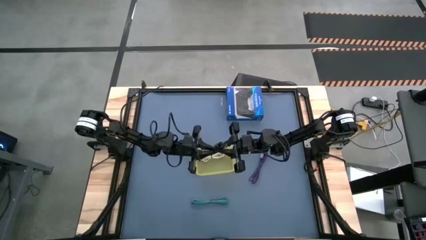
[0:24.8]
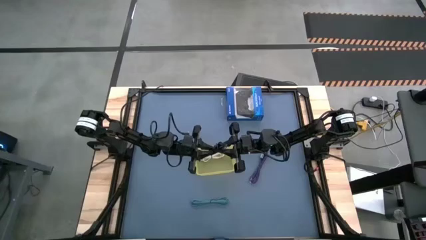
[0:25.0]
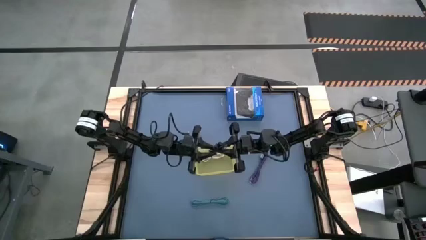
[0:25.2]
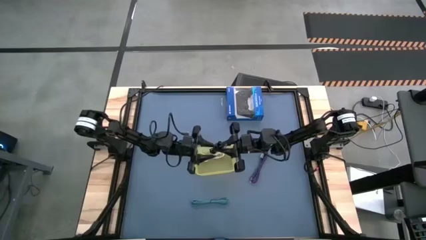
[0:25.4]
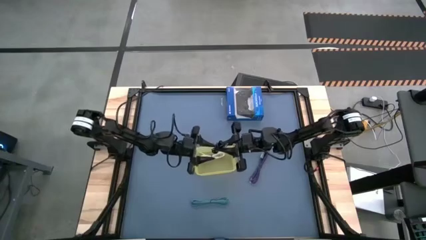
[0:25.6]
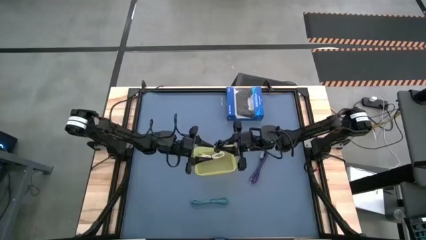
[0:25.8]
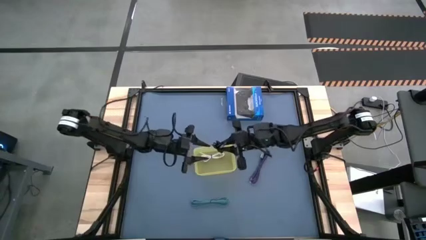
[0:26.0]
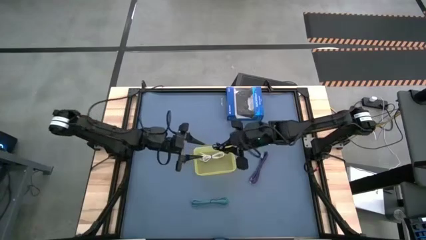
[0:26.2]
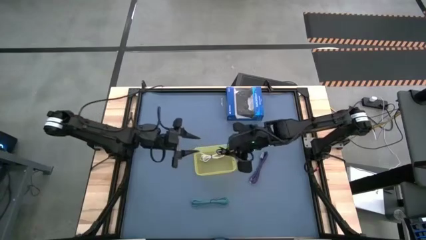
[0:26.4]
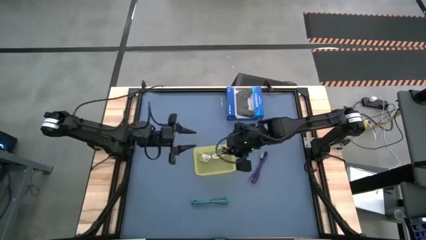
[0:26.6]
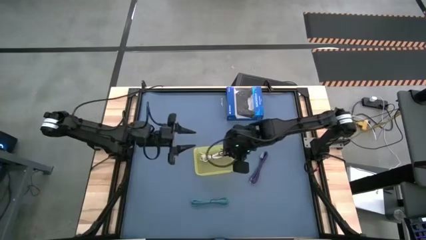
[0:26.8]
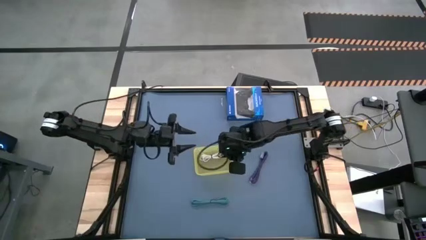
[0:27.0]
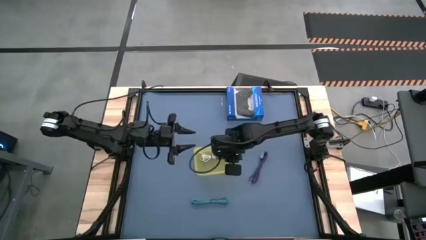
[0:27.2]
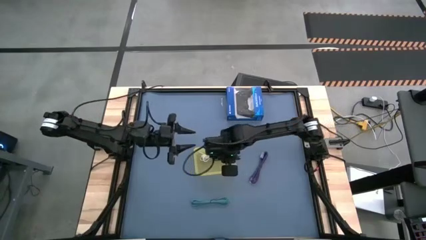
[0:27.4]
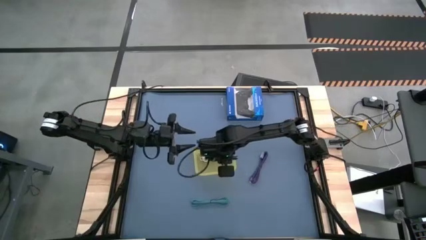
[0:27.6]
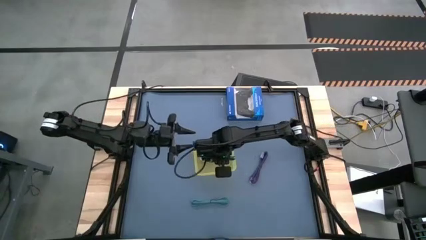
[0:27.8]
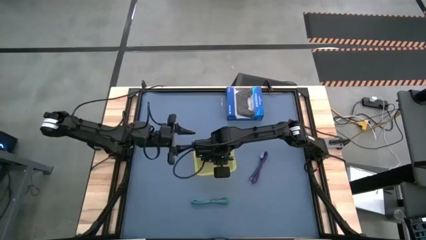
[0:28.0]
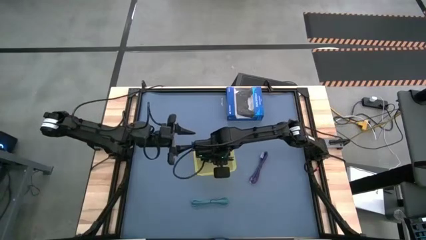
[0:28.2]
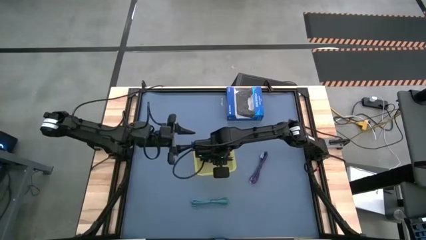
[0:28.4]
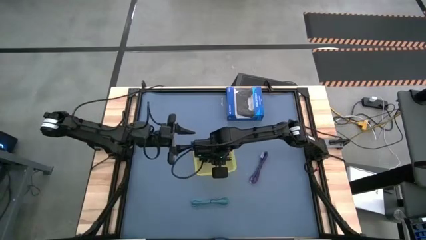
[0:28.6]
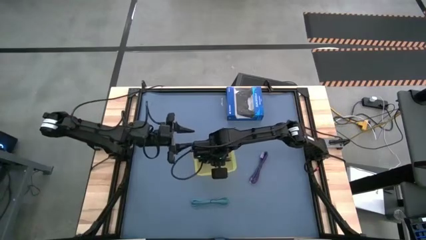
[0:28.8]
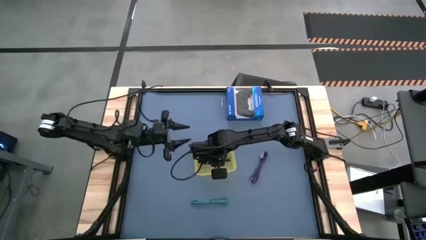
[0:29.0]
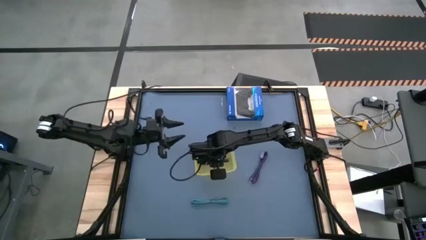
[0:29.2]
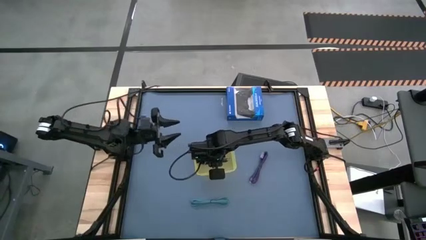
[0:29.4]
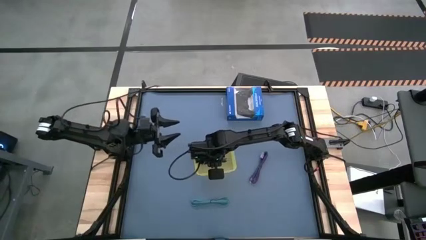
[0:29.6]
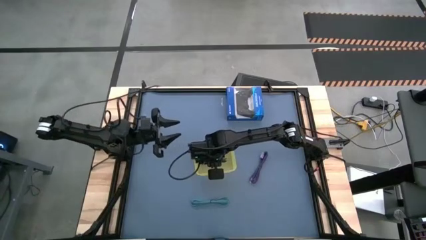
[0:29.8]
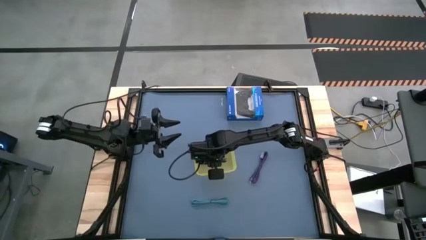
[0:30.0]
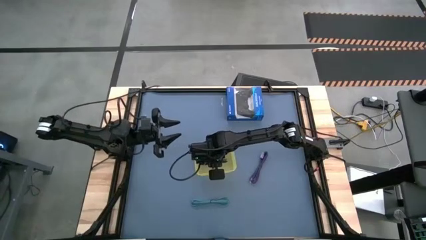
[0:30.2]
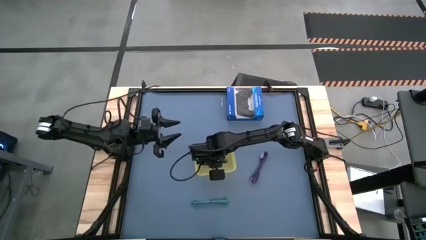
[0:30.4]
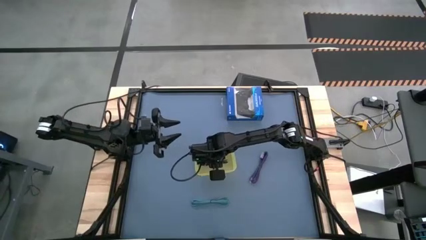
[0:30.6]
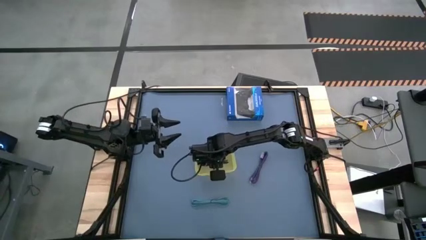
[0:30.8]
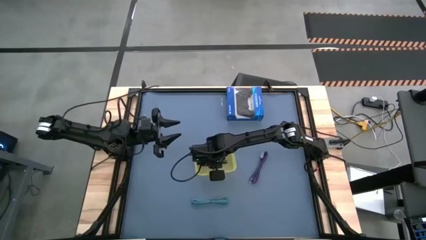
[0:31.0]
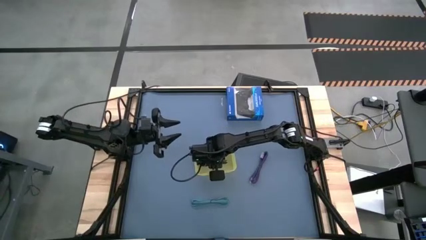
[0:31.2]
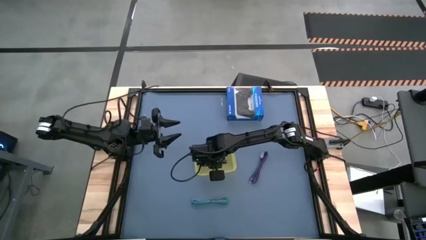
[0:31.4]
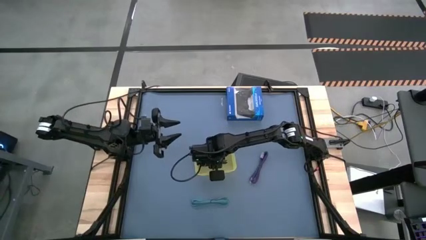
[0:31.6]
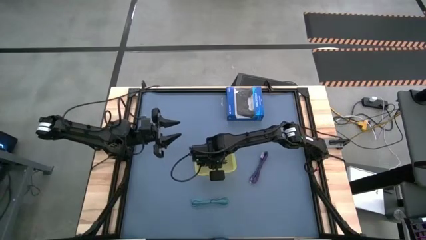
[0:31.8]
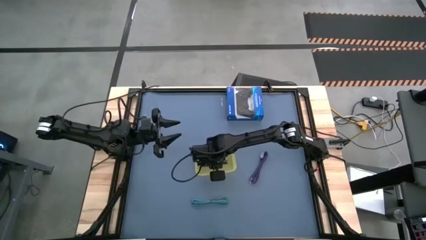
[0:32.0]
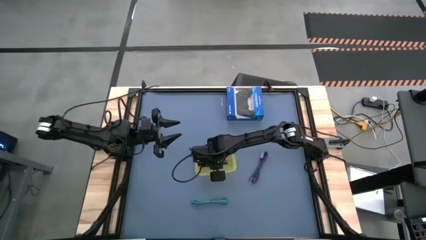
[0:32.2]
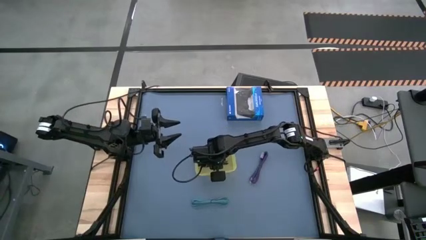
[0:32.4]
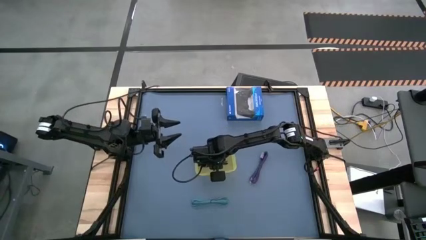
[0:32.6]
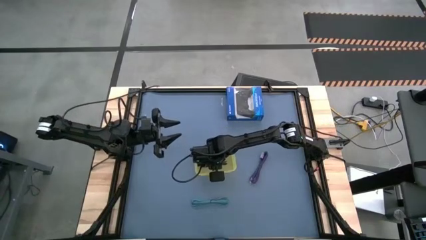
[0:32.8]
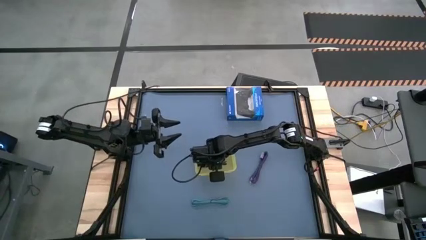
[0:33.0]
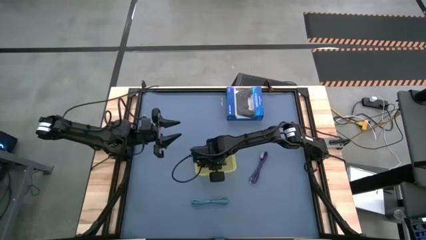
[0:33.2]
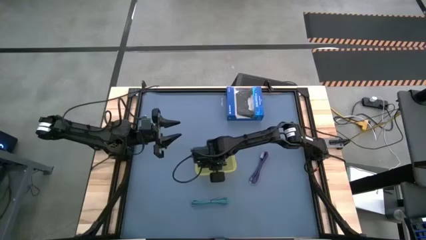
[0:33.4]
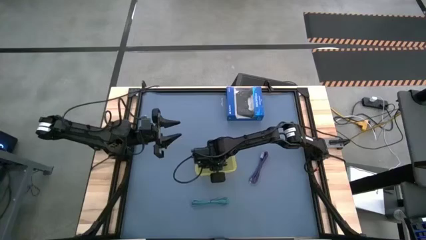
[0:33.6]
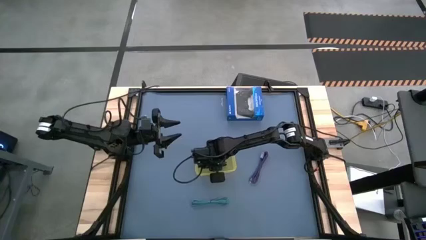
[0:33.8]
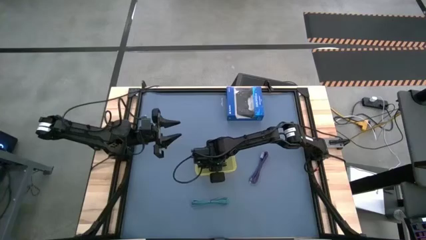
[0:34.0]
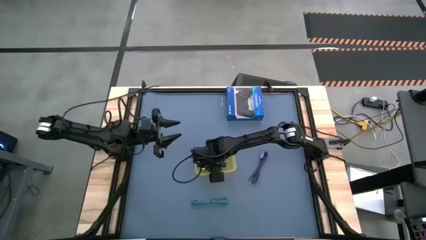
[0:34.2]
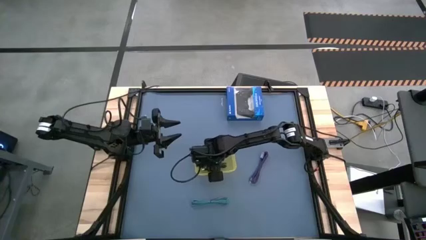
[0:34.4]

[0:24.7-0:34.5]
Task: Pick and place USB-C Cables
Put the black charger cable into the yellow bin

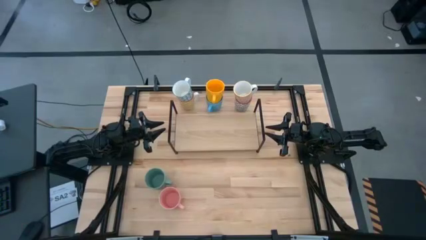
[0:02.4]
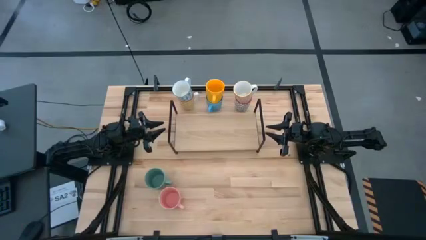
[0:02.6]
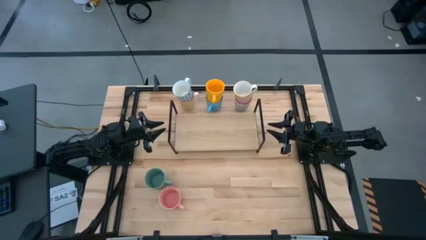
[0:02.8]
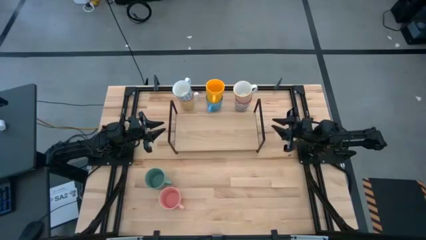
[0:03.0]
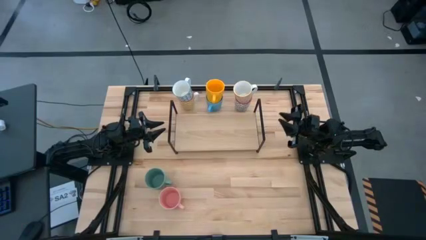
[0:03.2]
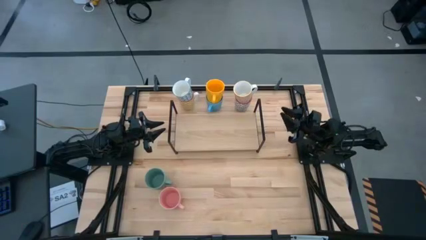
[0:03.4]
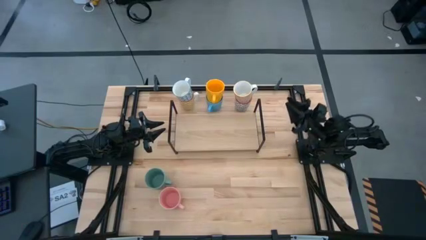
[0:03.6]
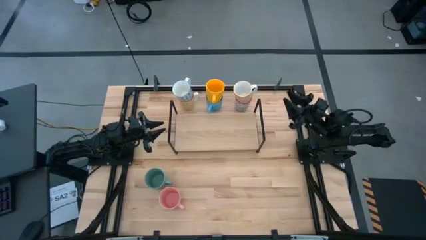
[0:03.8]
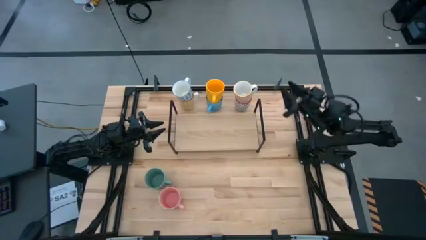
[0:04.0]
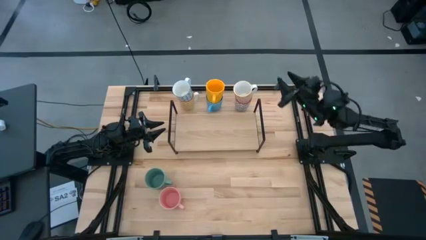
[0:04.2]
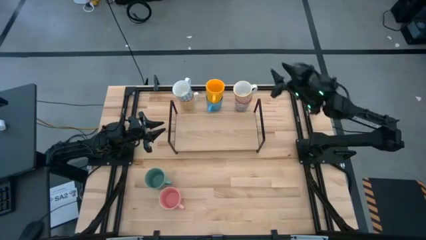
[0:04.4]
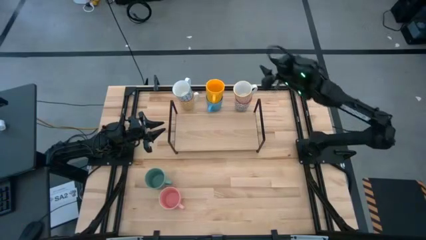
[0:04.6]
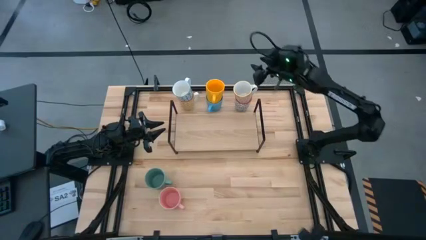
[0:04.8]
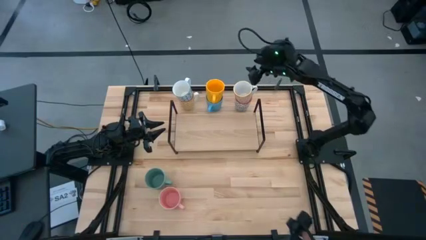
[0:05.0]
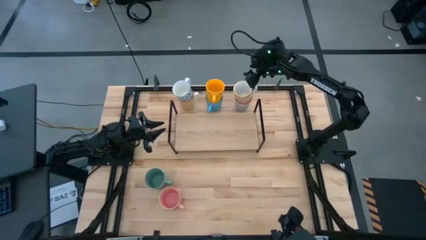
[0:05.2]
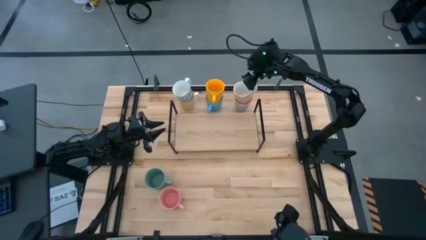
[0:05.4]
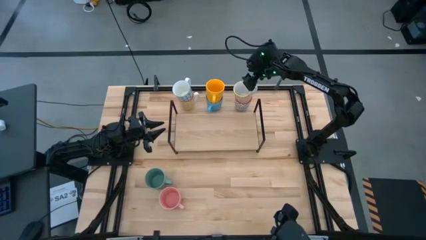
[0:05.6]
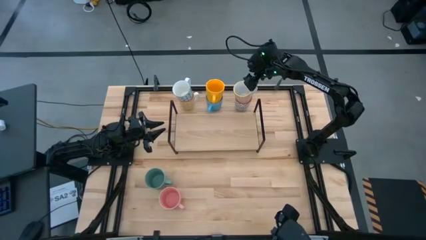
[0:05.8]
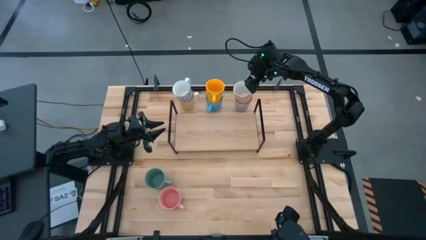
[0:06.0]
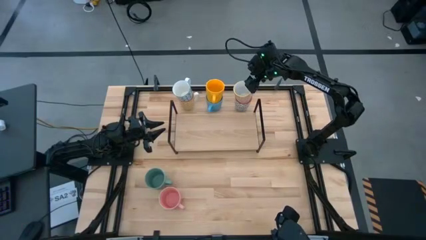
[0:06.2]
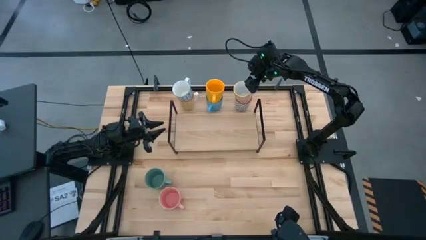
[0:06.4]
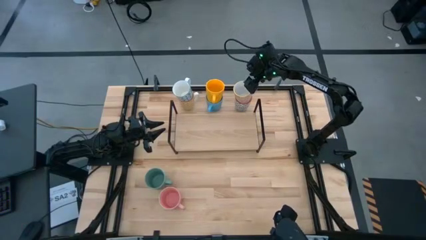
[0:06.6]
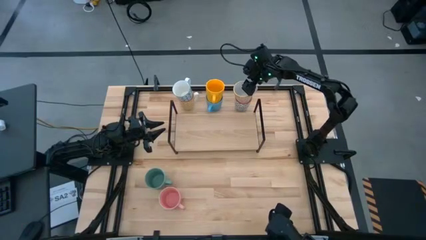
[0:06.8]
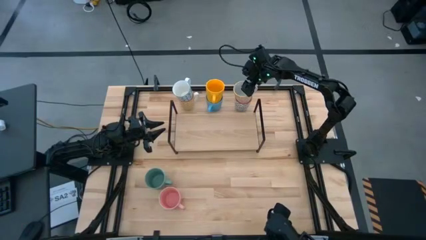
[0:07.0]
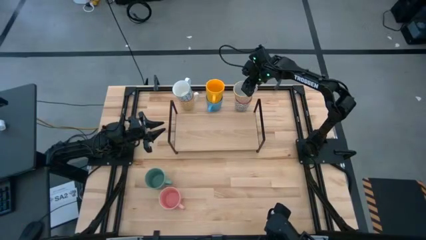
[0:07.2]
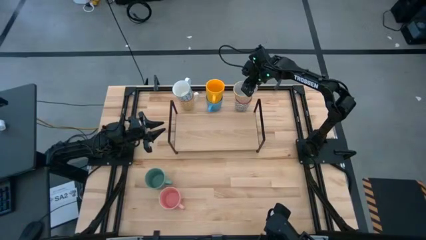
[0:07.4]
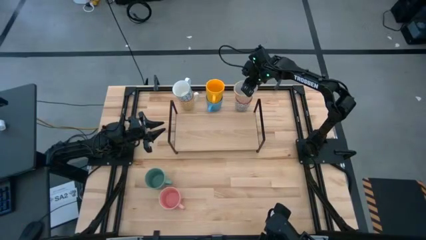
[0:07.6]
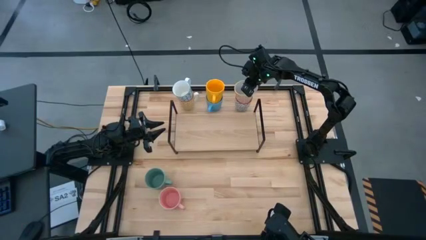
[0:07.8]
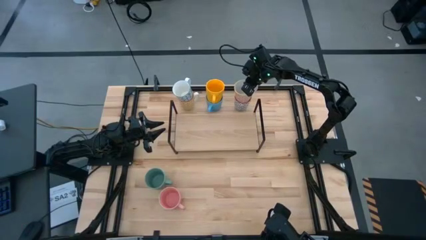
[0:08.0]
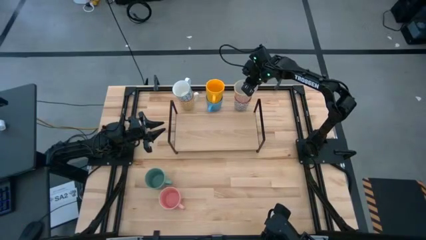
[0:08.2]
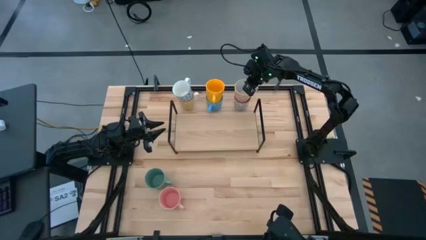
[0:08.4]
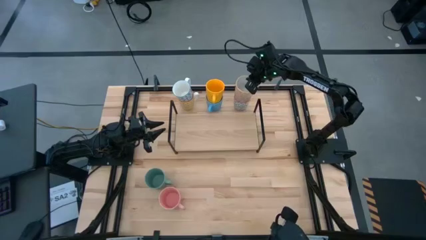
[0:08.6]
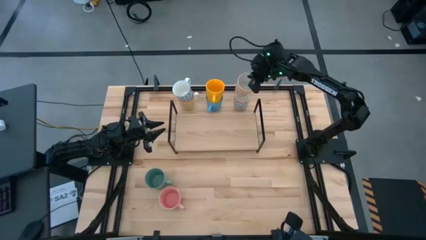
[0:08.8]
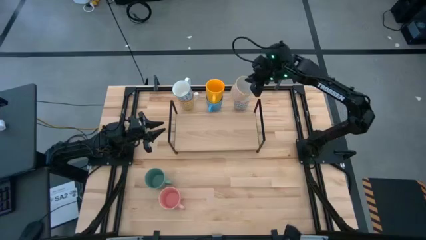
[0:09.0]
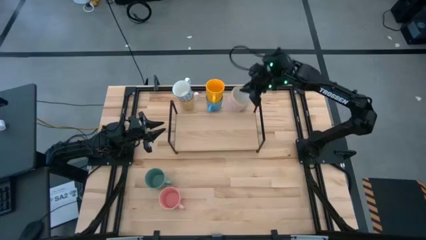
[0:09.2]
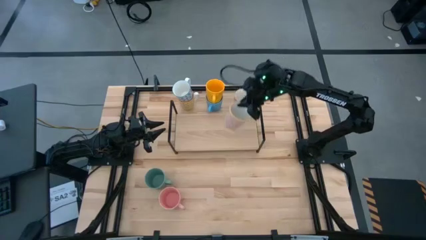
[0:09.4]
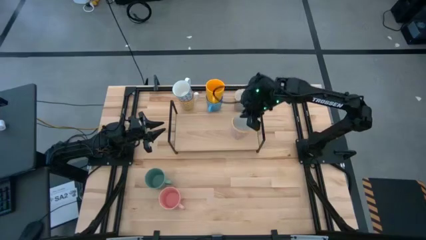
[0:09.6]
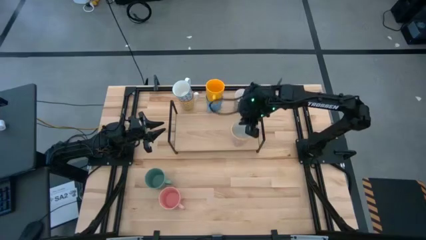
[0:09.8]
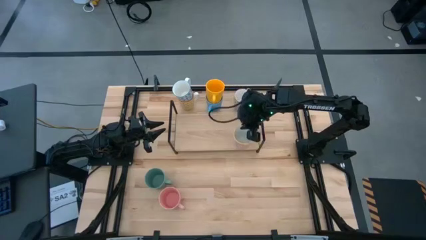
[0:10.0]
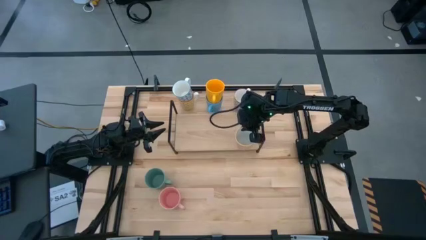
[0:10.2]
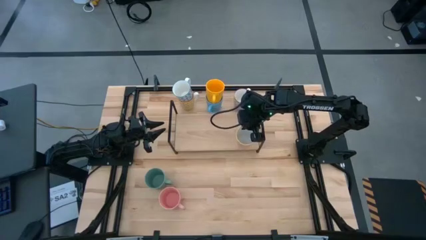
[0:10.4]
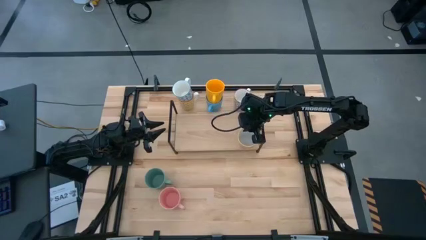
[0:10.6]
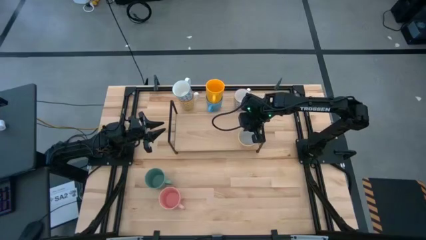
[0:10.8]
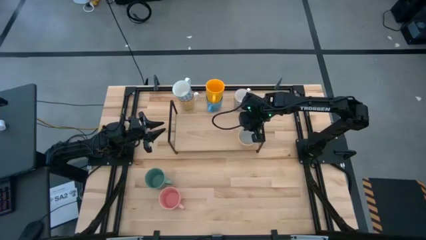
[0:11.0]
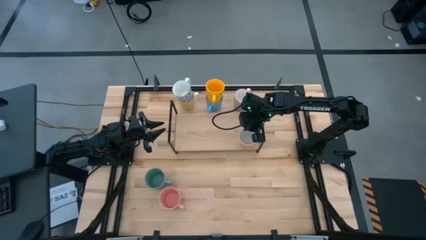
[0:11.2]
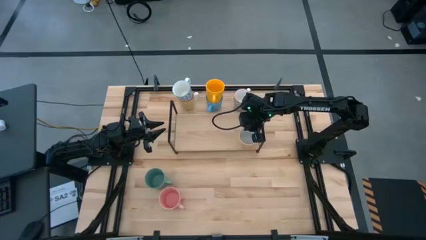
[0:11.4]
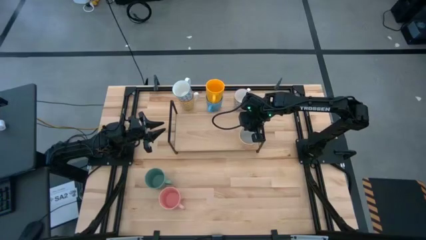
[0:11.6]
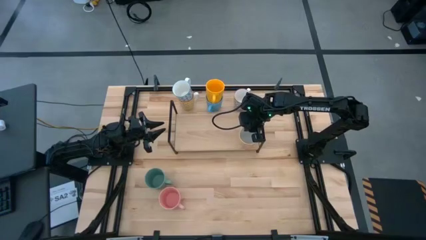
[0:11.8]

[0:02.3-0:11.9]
Task: Place coffee mugs
Put the orange patterned mug on the shelf
